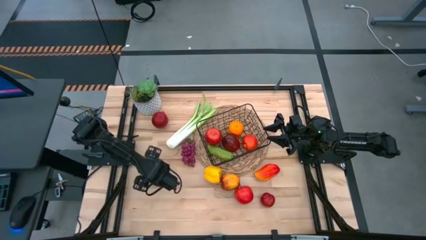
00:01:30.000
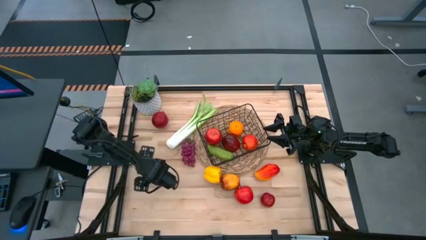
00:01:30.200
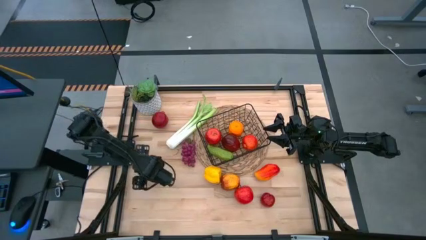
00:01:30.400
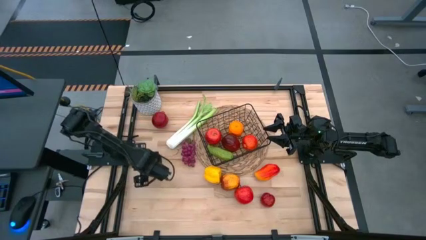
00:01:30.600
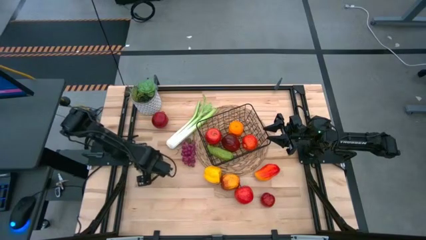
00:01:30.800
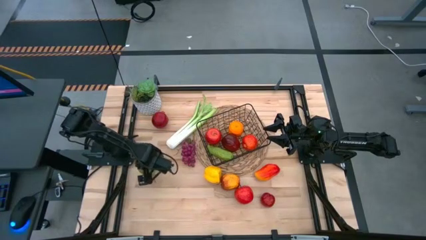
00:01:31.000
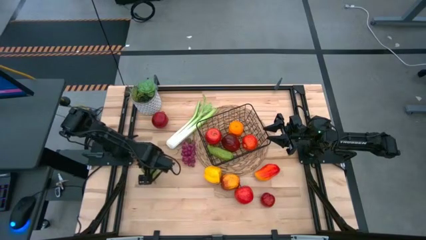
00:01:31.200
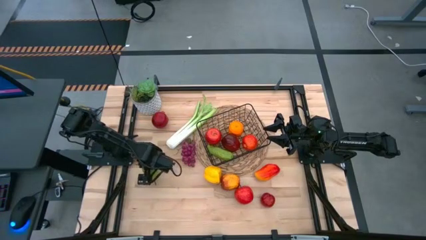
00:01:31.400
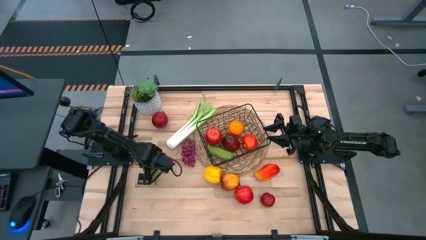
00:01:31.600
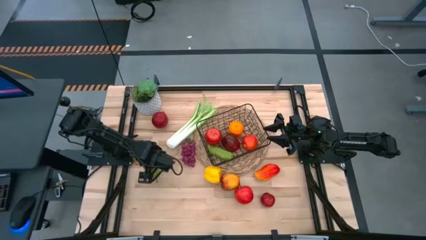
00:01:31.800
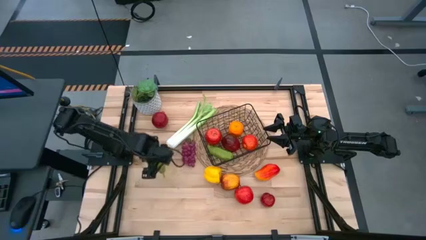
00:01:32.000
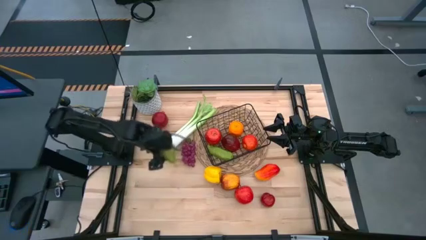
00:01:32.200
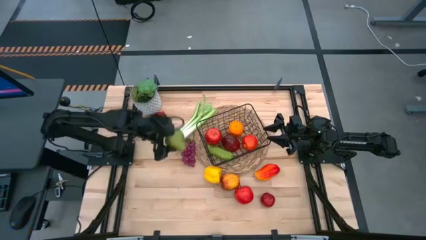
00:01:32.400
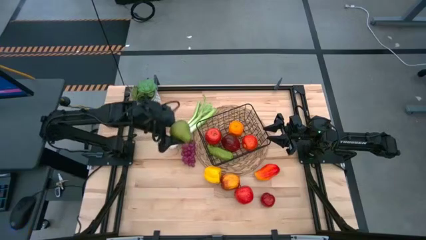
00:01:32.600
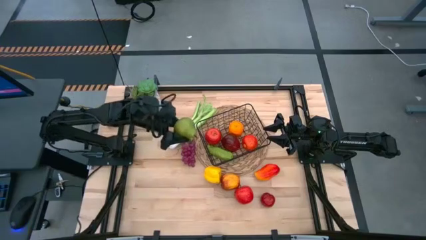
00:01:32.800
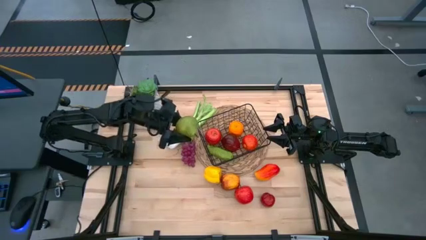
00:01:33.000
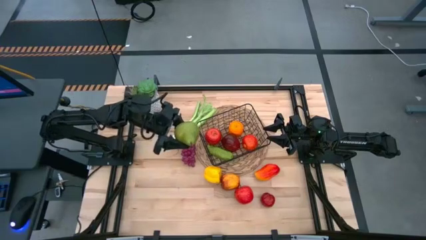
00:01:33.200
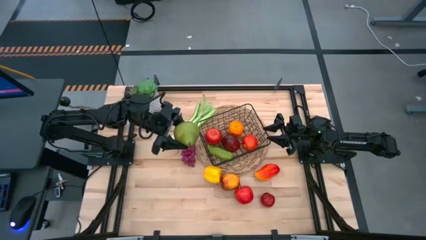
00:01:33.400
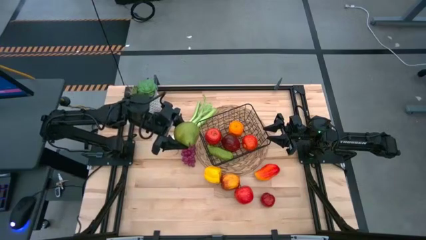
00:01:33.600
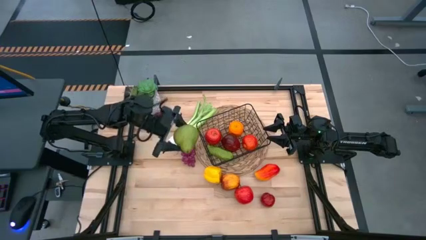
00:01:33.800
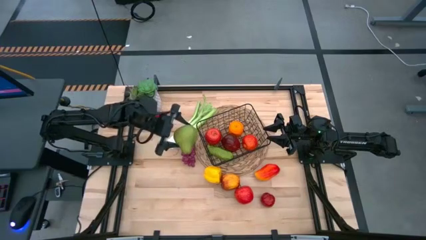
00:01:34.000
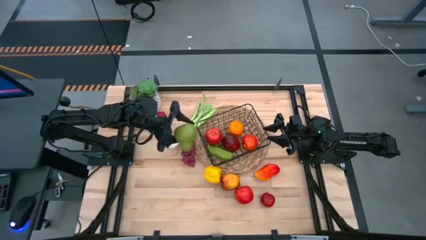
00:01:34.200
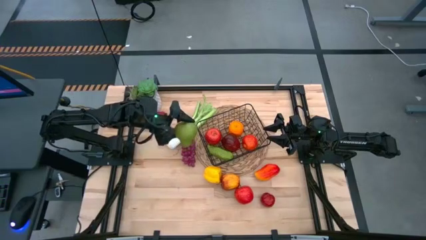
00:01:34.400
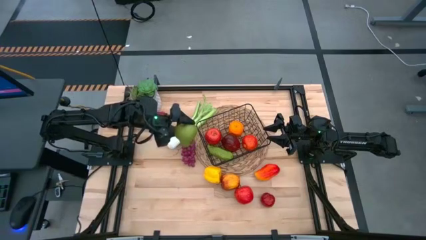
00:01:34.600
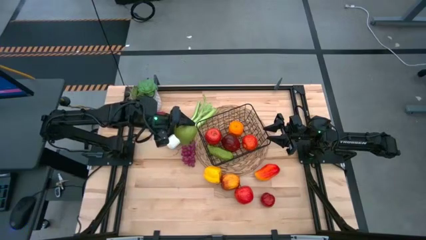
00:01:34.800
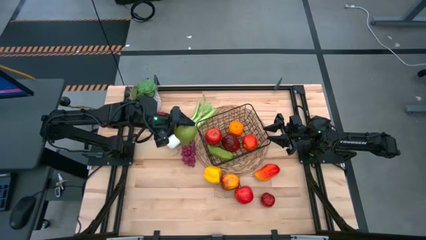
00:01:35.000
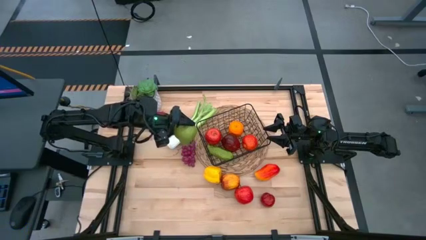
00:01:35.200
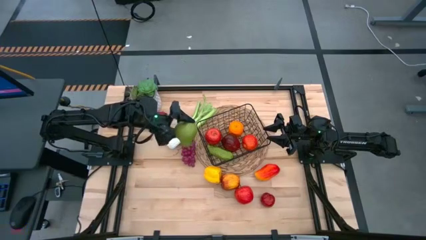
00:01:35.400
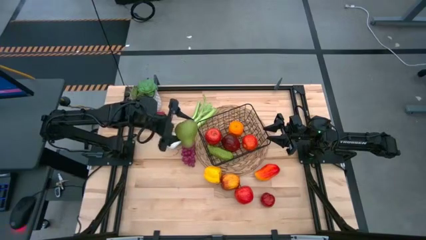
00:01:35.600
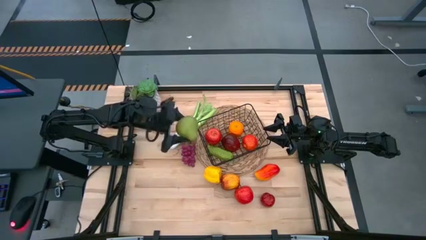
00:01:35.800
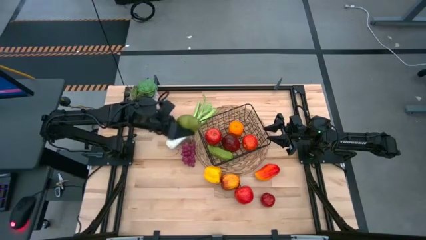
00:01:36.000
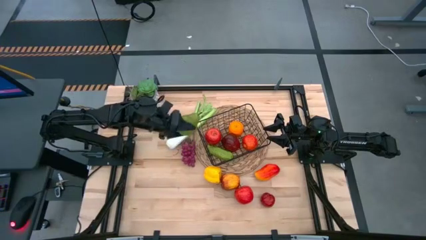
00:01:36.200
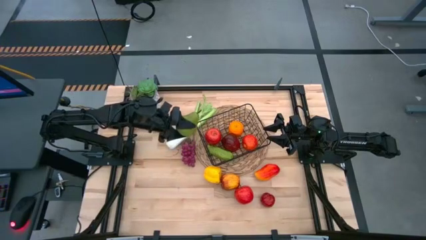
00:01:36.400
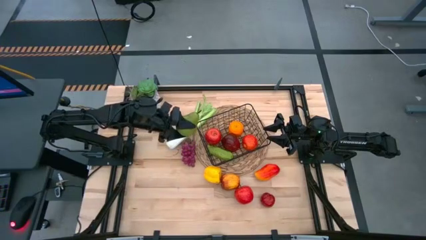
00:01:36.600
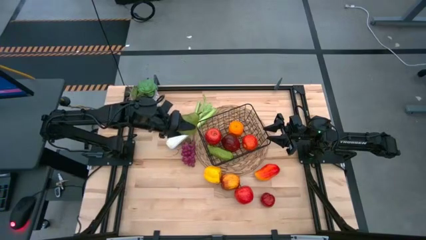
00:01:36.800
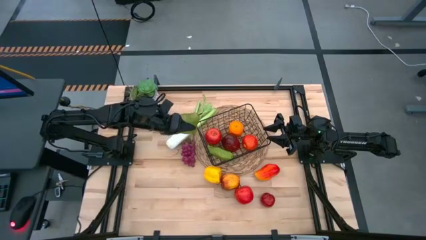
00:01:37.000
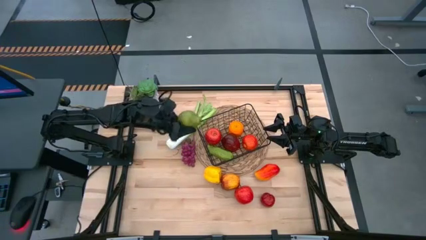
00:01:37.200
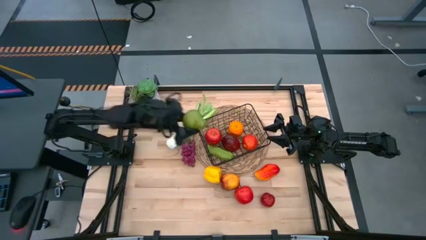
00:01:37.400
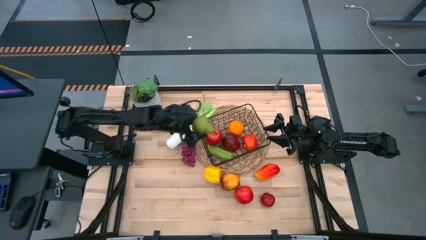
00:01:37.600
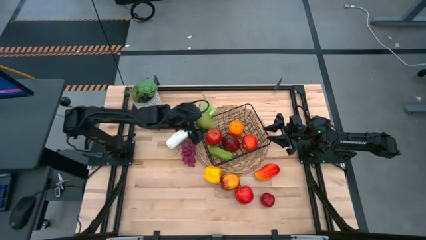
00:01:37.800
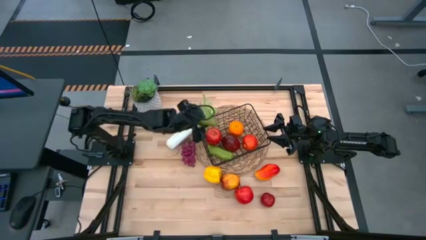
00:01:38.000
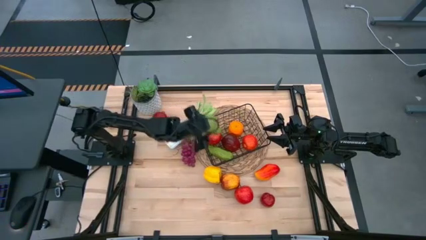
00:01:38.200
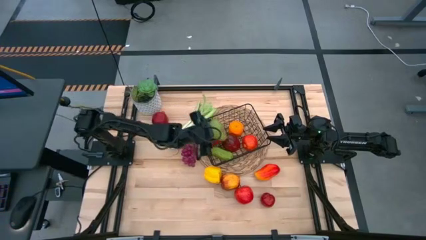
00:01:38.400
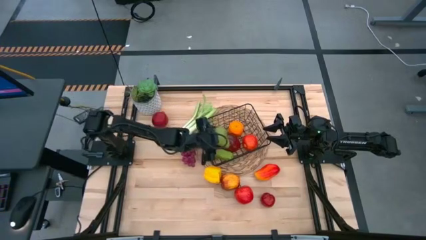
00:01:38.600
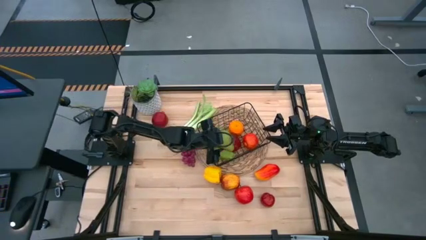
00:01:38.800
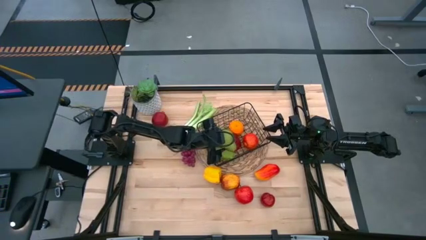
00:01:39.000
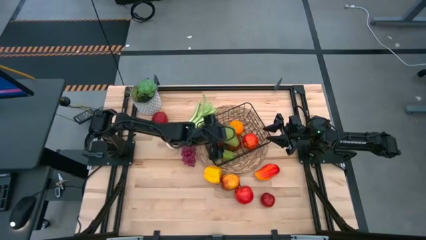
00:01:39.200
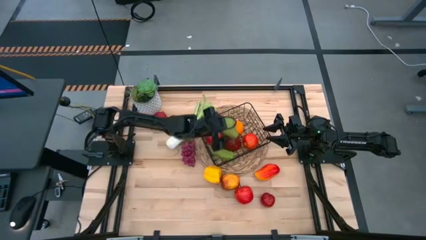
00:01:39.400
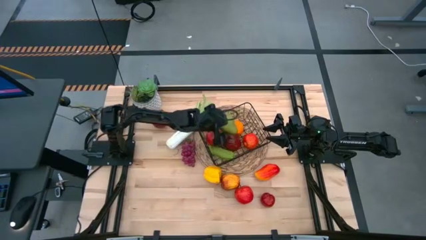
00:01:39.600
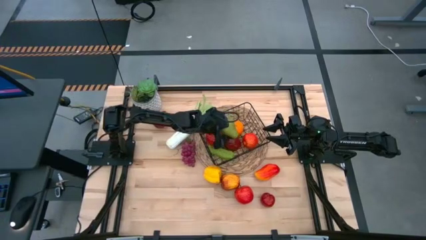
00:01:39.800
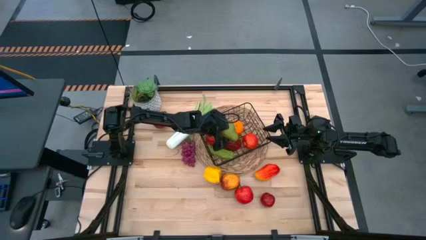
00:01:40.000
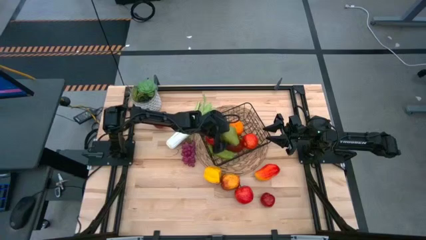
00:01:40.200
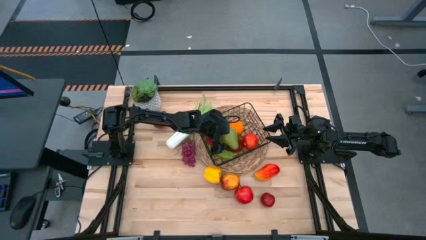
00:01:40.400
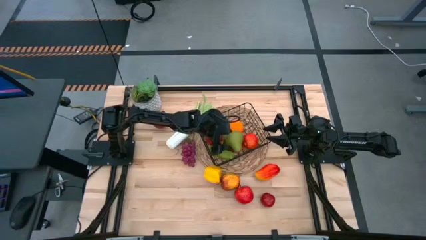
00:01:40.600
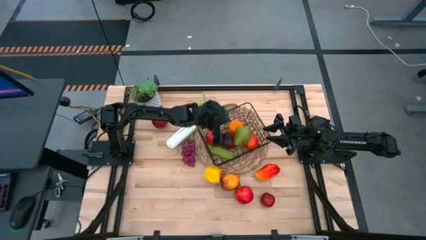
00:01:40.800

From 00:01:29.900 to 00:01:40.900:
Task: Build produce basket
Put the green pear into the black wire basket
